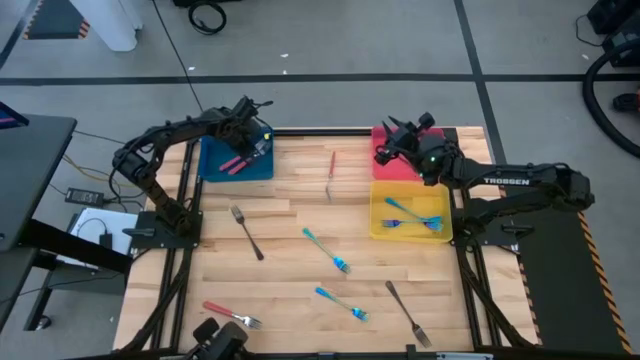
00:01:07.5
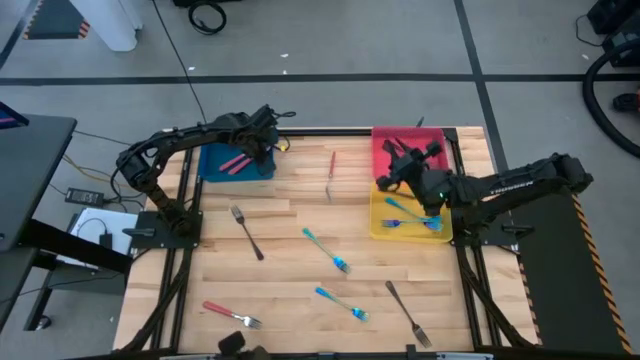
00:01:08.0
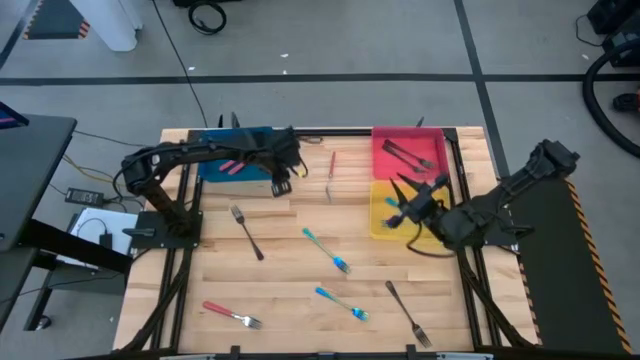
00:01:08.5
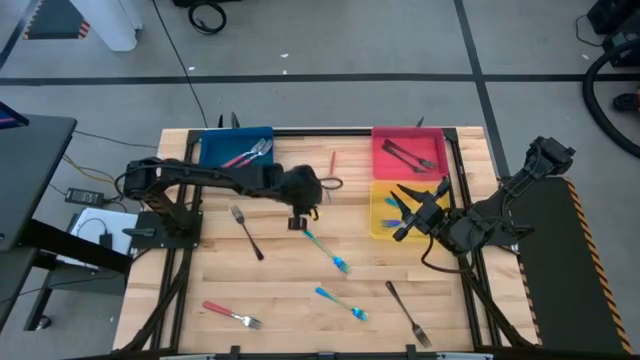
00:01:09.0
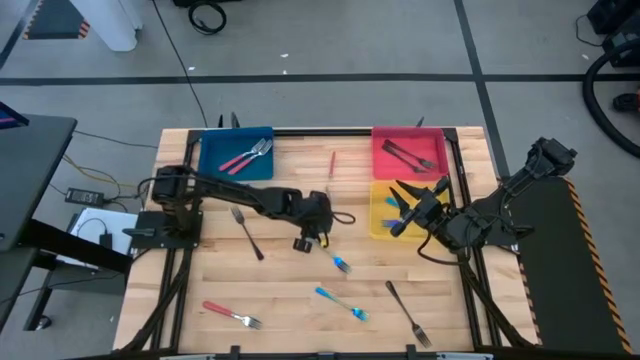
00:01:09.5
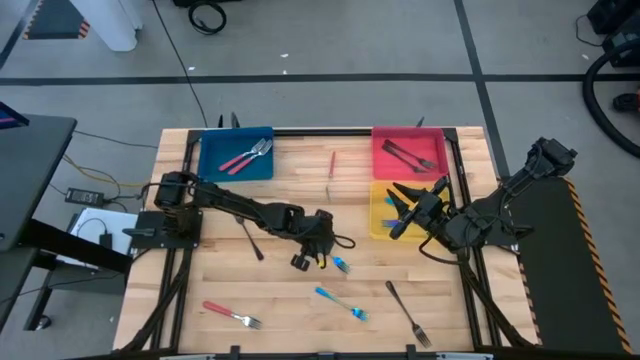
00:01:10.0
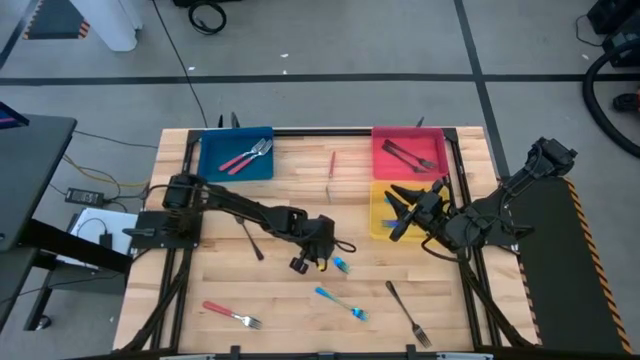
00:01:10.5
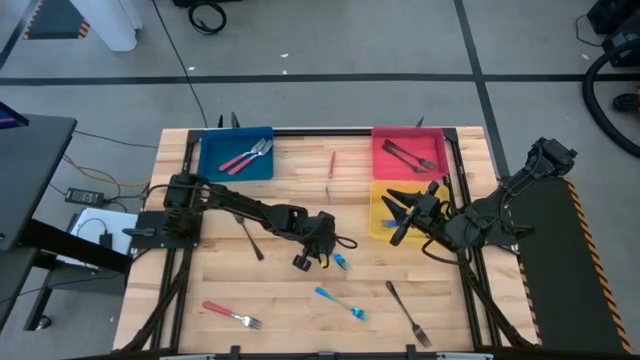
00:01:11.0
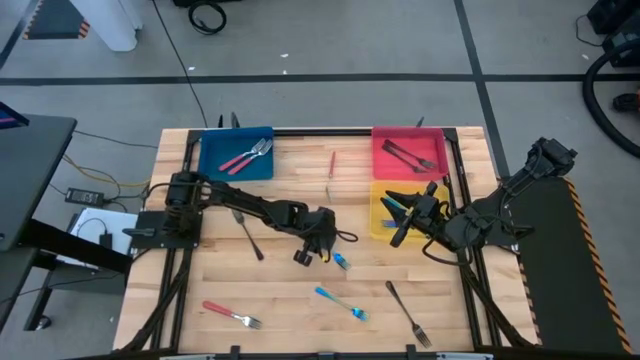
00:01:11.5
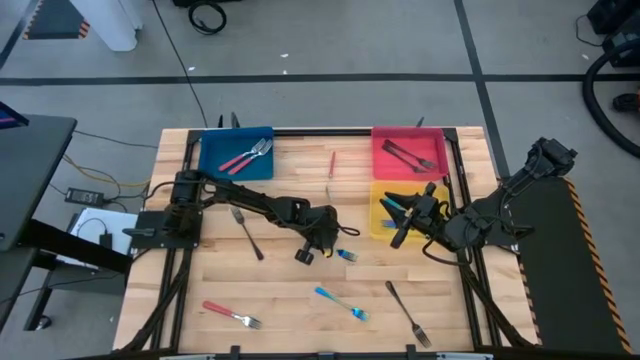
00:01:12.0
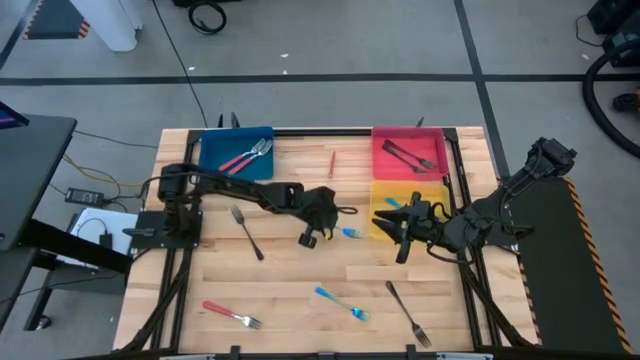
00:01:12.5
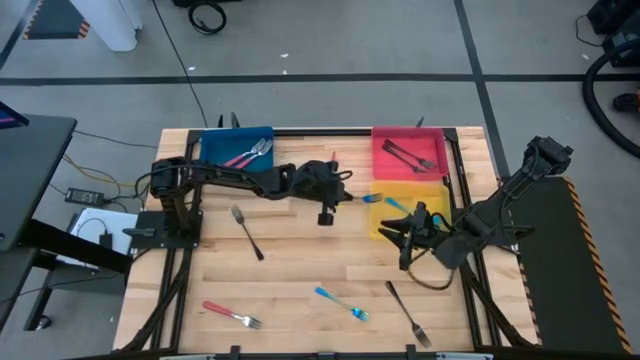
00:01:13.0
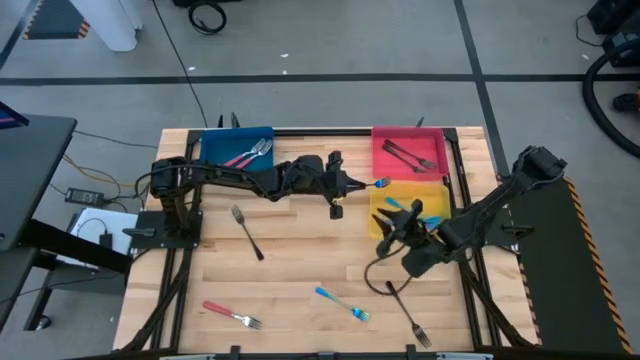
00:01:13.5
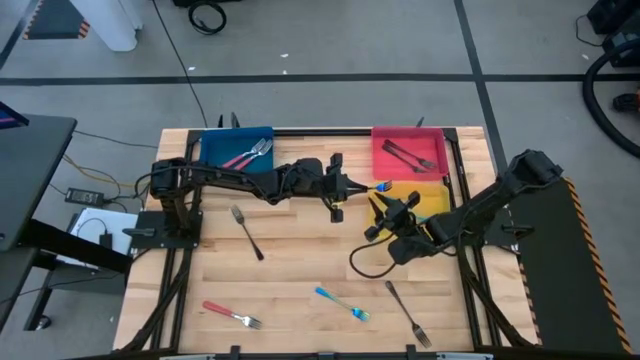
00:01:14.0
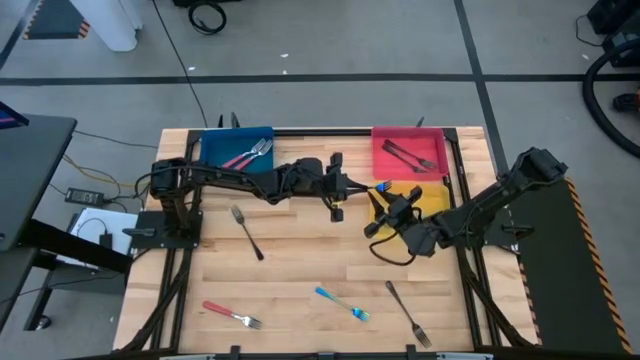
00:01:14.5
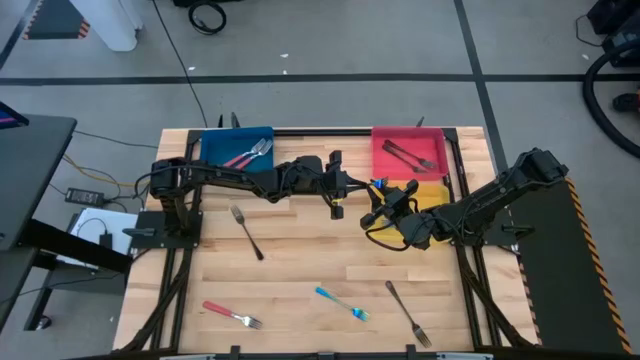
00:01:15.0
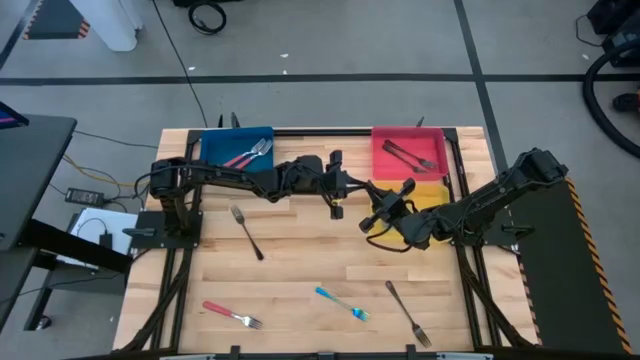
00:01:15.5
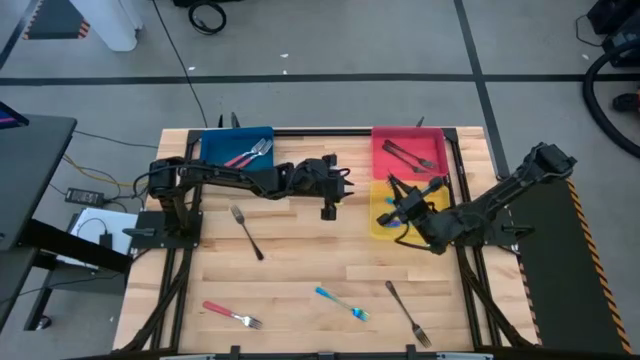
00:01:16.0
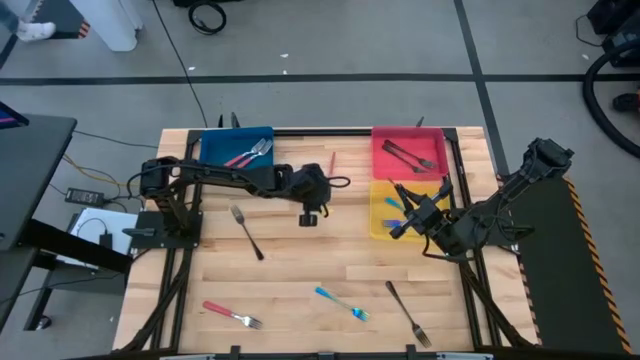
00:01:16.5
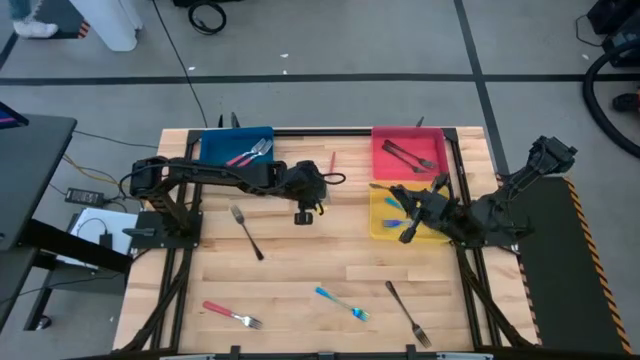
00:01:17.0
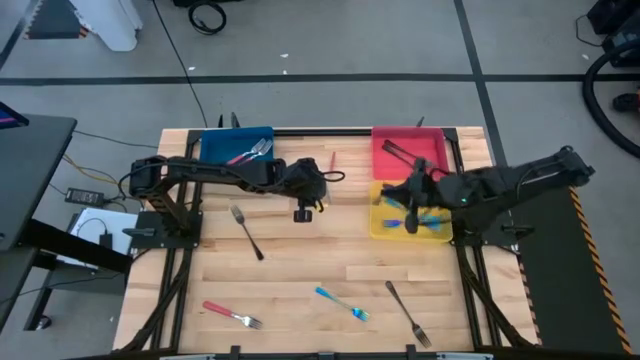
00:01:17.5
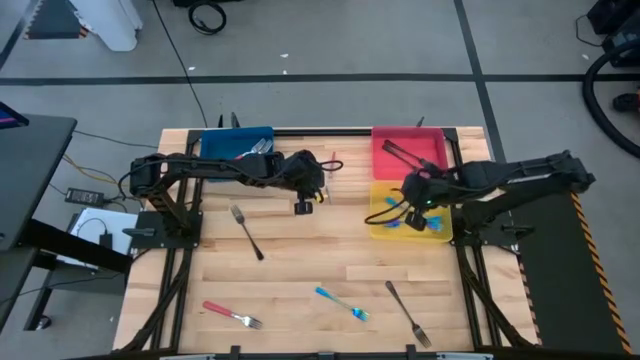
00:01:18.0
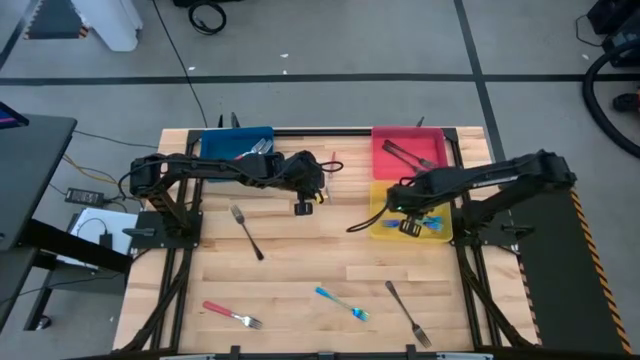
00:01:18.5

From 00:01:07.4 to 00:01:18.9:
Task: Sort silverware by color (type)
Put the top blue fork into the yellow bin

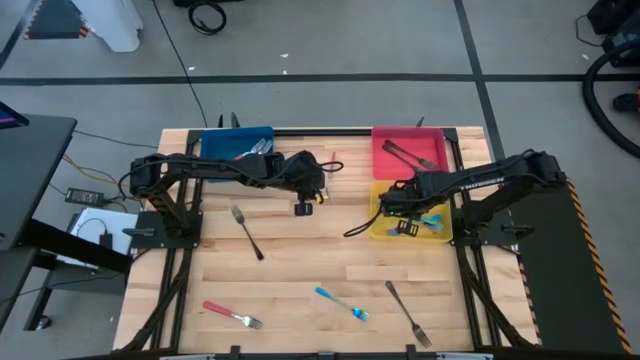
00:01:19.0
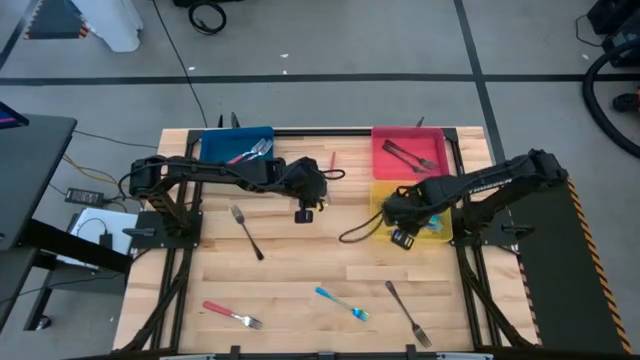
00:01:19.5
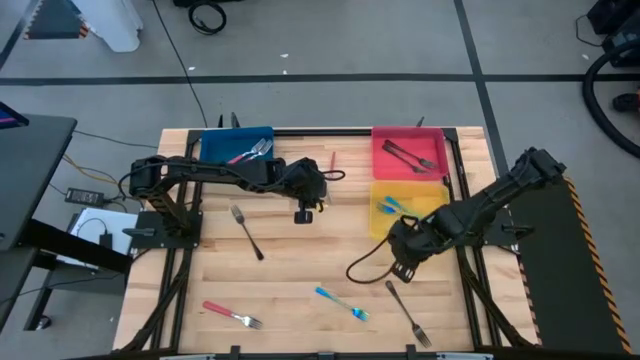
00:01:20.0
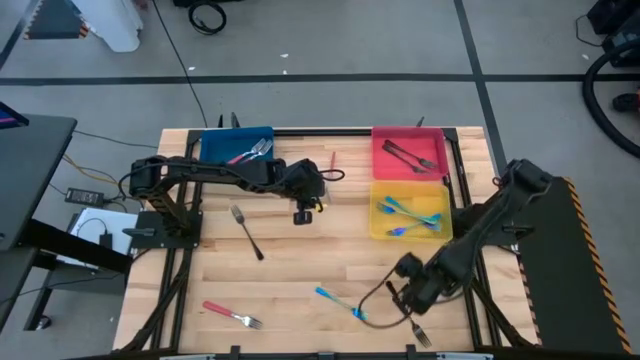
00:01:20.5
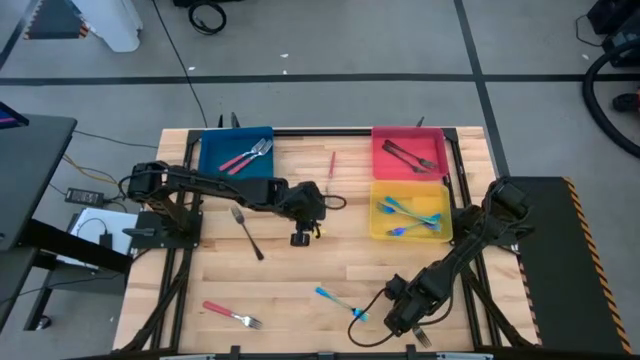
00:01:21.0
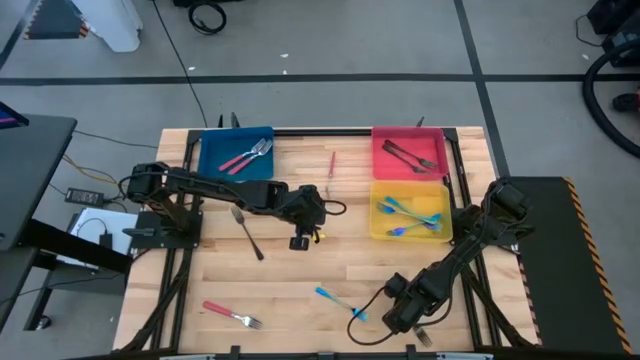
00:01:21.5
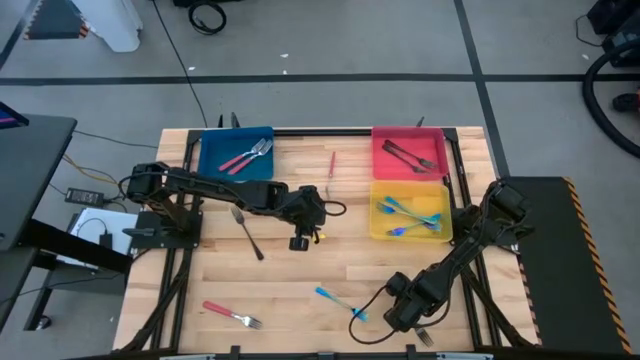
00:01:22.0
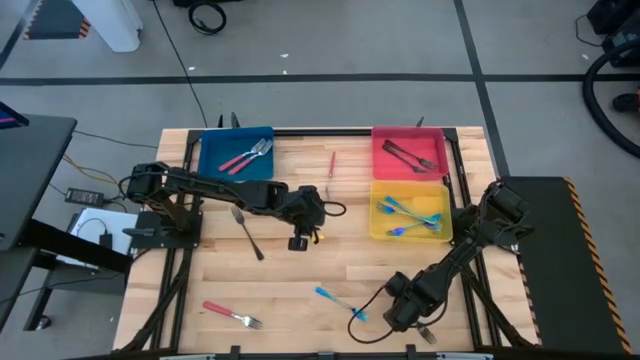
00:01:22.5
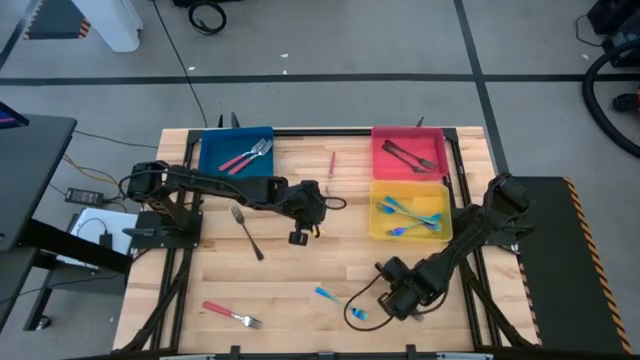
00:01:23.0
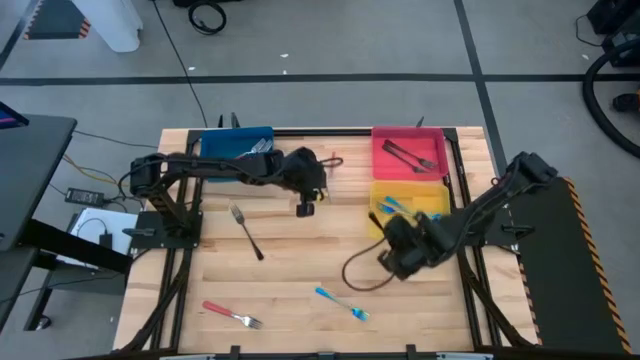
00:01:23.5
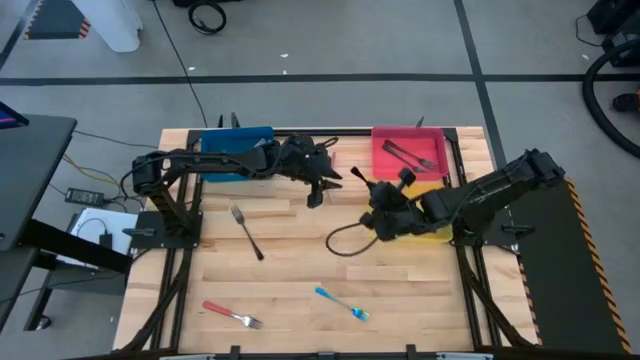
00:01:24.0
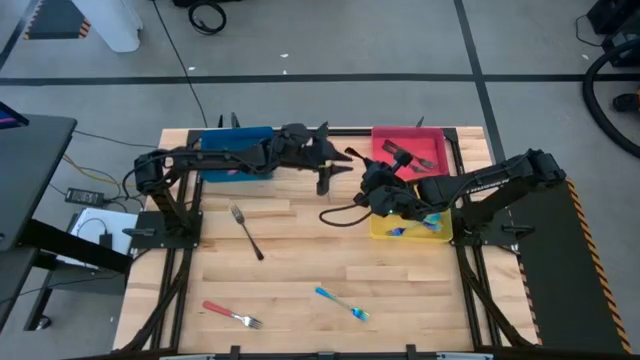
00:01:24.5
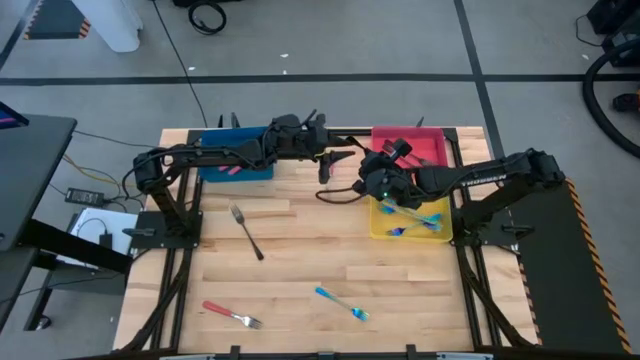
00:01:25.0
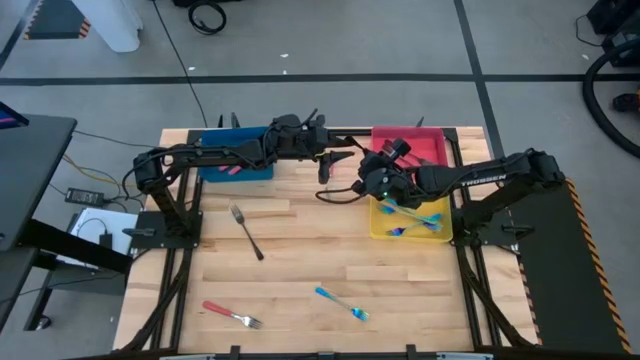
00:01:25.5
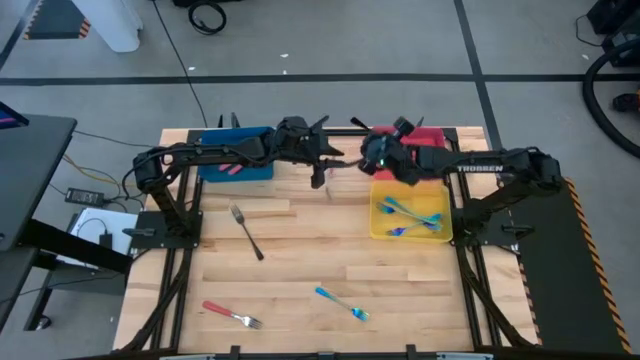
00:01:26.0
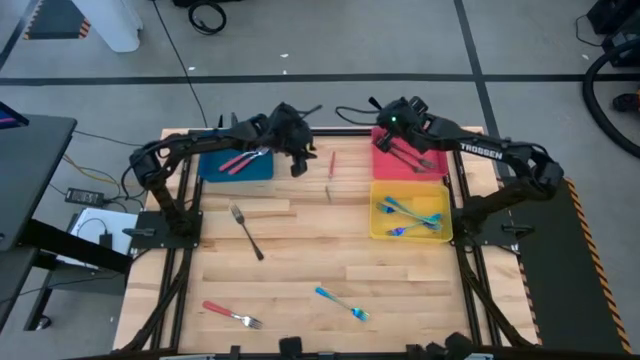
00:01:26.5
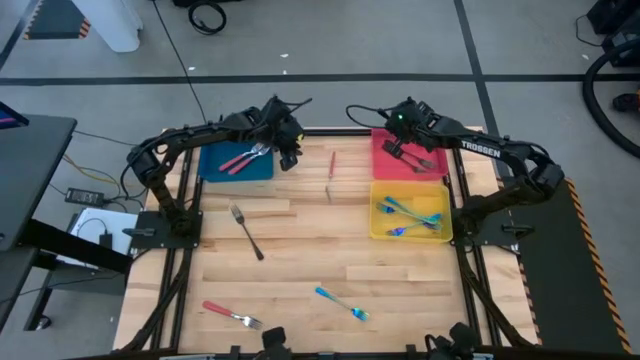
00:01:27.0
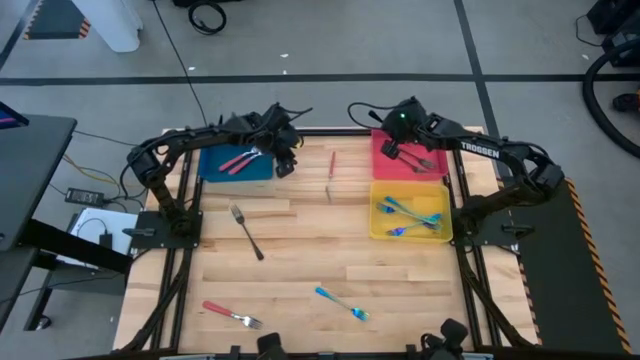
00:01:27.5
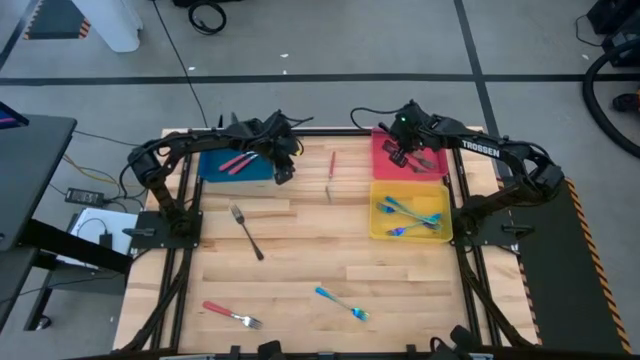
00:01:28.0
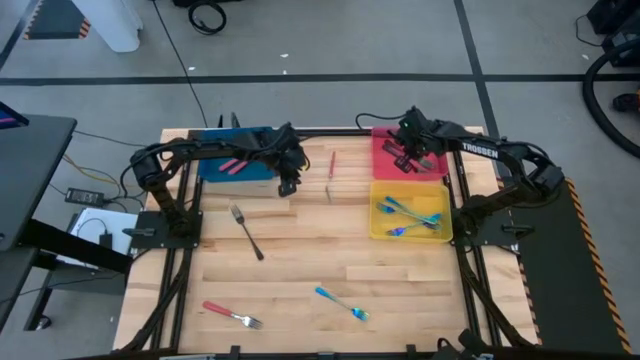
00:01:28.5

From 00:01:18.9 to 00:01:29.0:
Put the right black fork into the red bin
